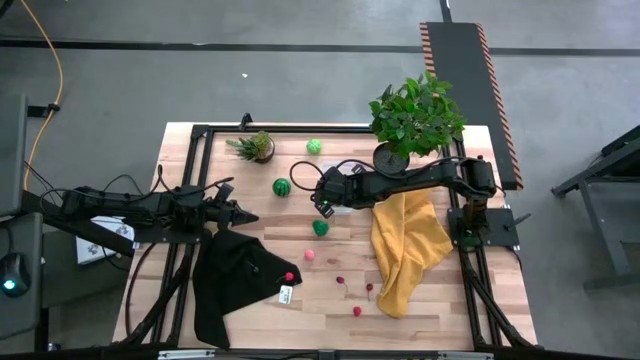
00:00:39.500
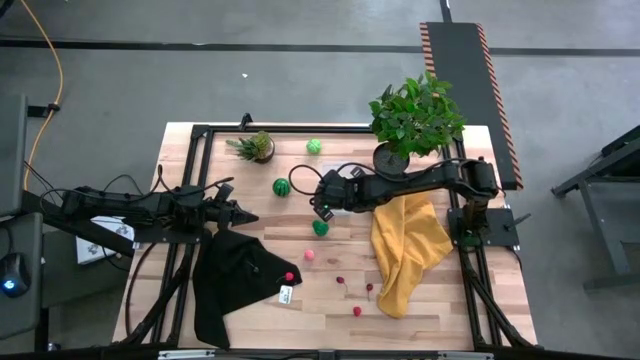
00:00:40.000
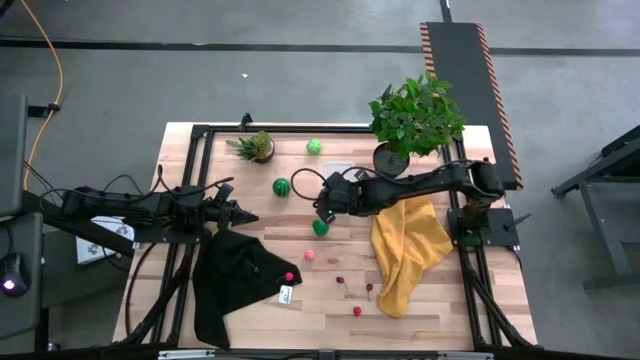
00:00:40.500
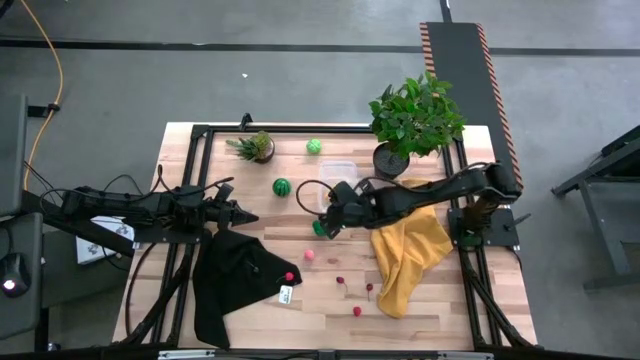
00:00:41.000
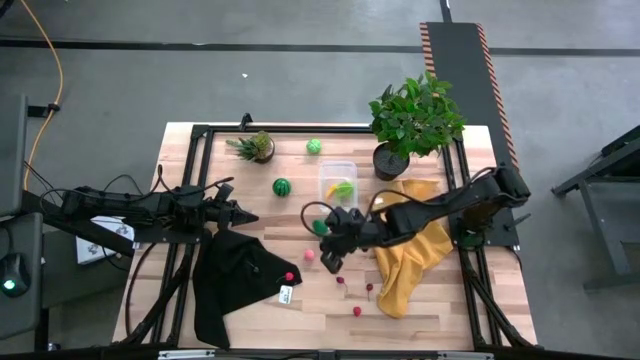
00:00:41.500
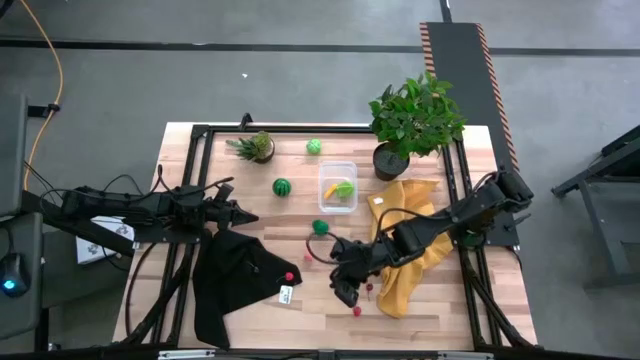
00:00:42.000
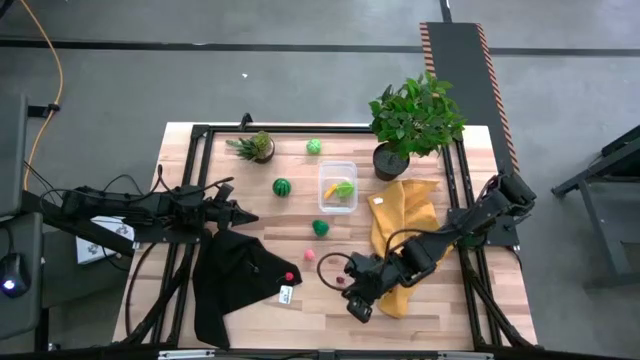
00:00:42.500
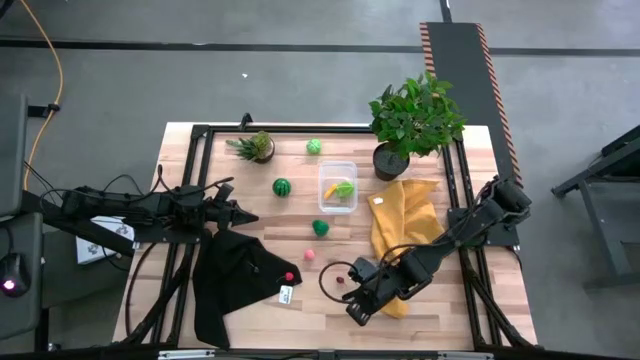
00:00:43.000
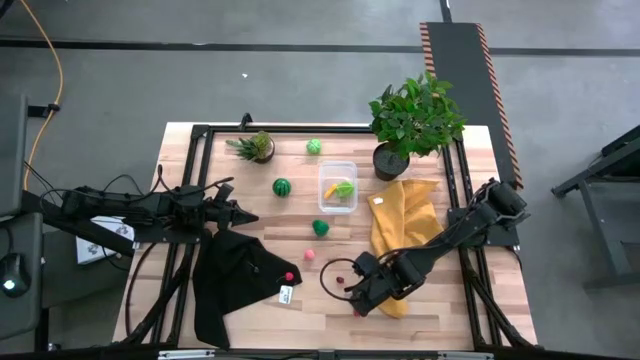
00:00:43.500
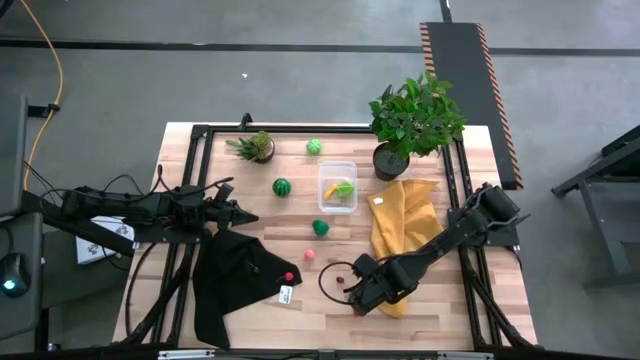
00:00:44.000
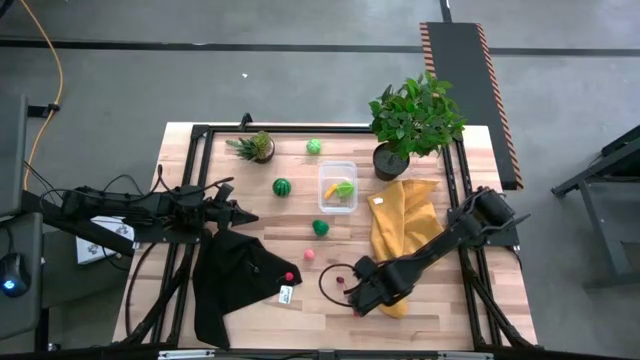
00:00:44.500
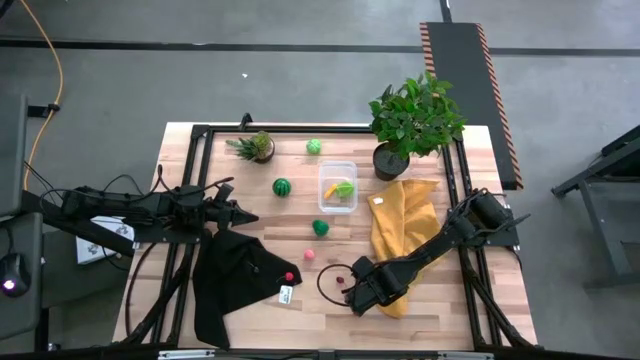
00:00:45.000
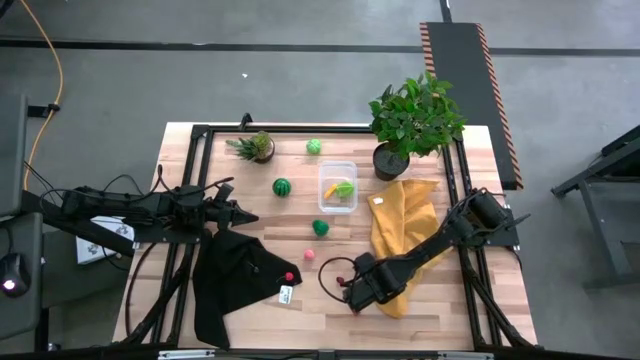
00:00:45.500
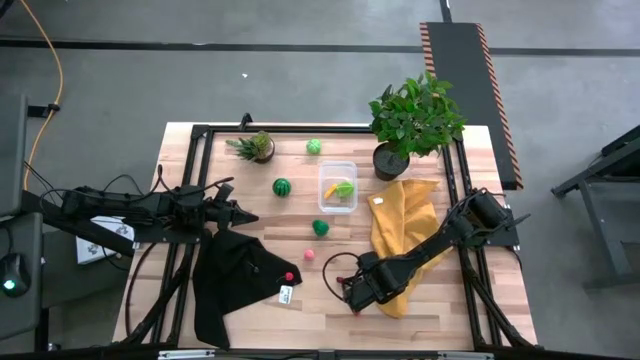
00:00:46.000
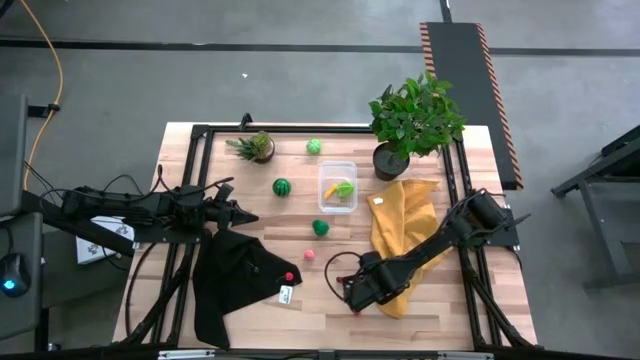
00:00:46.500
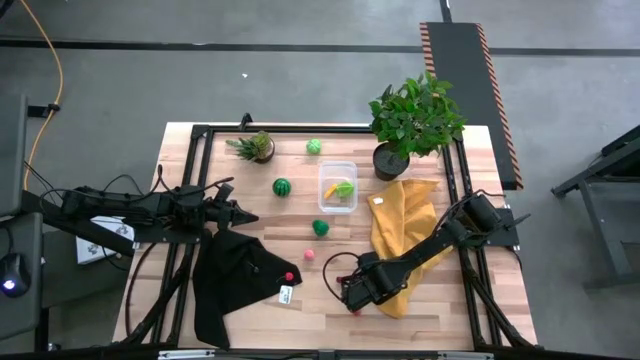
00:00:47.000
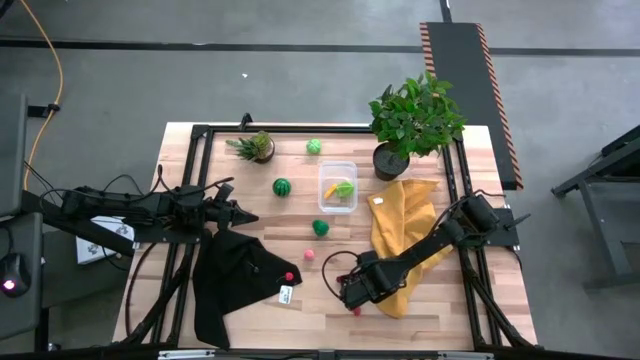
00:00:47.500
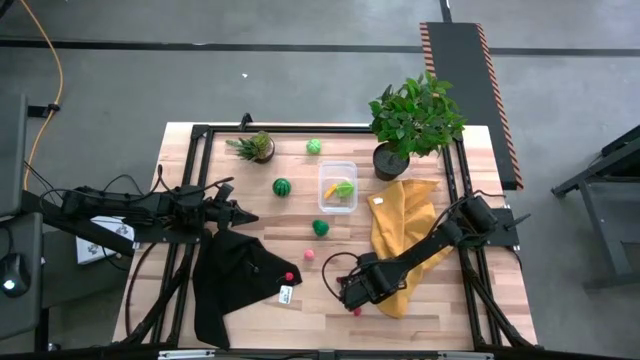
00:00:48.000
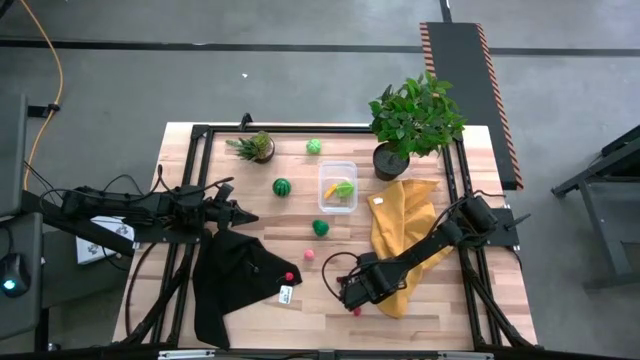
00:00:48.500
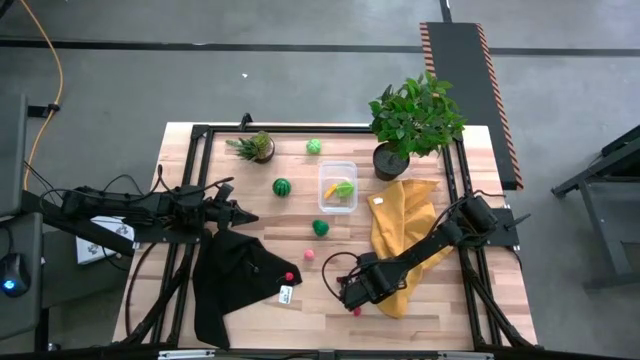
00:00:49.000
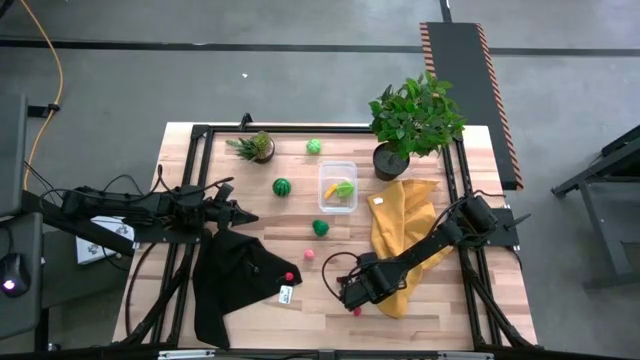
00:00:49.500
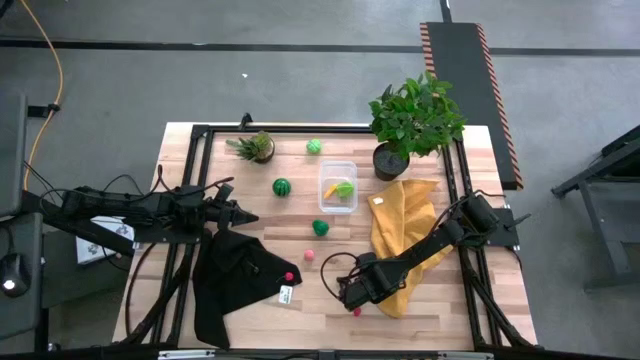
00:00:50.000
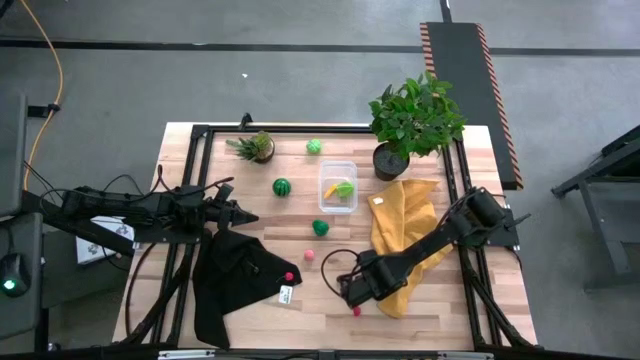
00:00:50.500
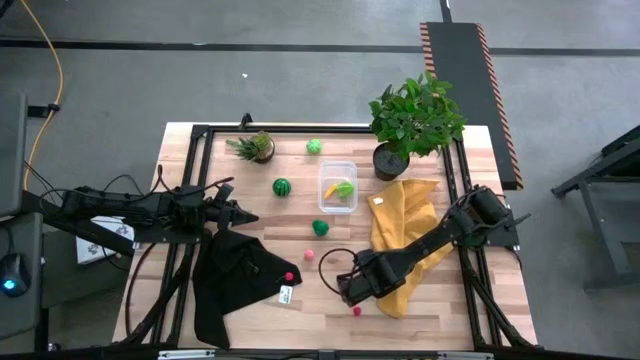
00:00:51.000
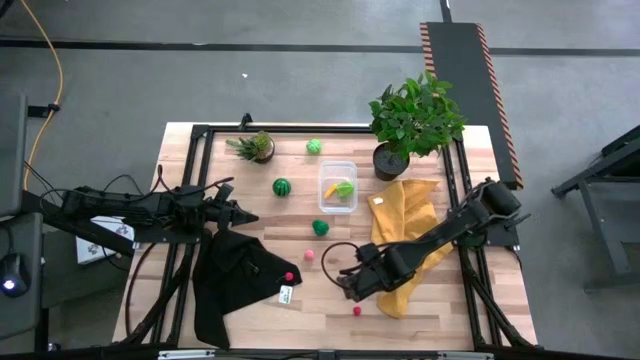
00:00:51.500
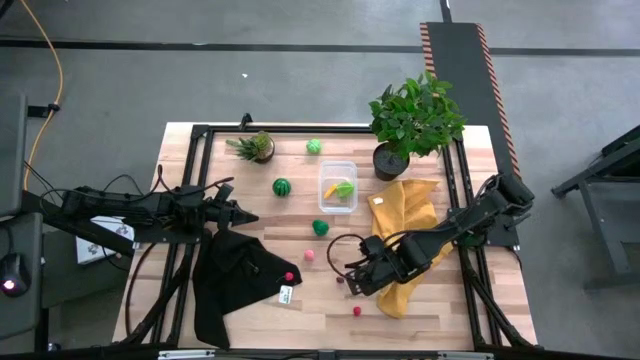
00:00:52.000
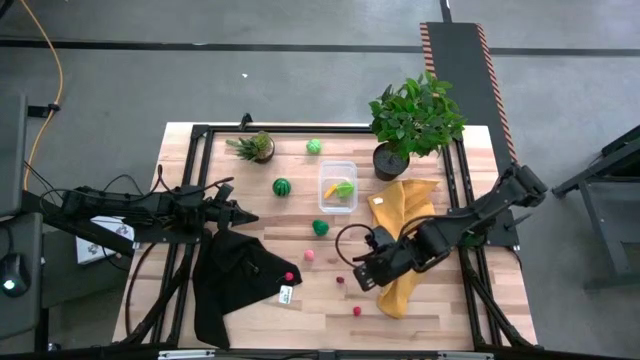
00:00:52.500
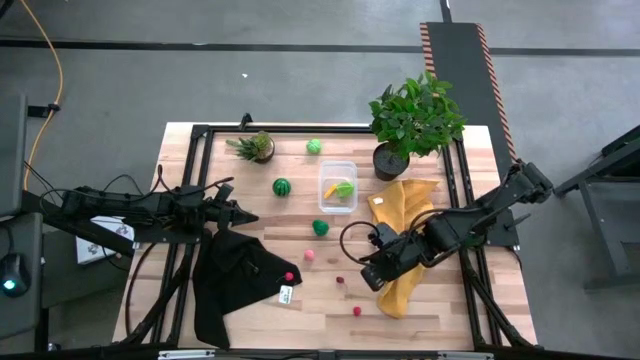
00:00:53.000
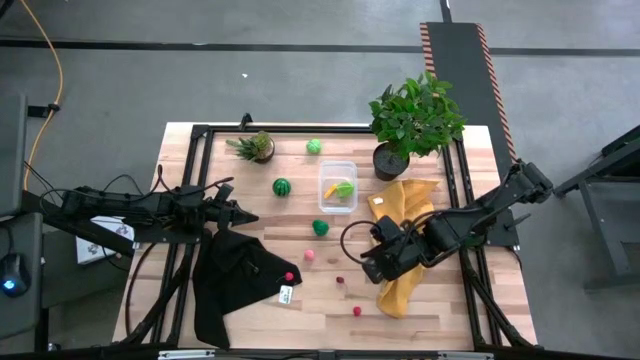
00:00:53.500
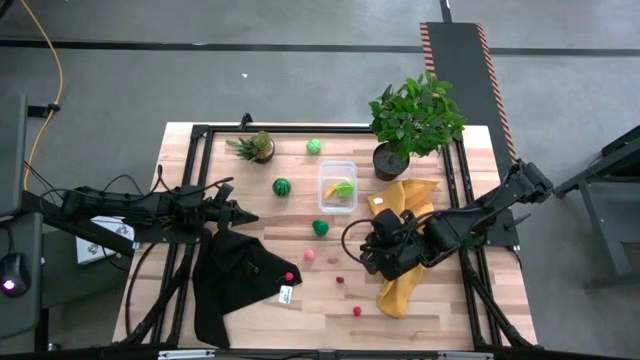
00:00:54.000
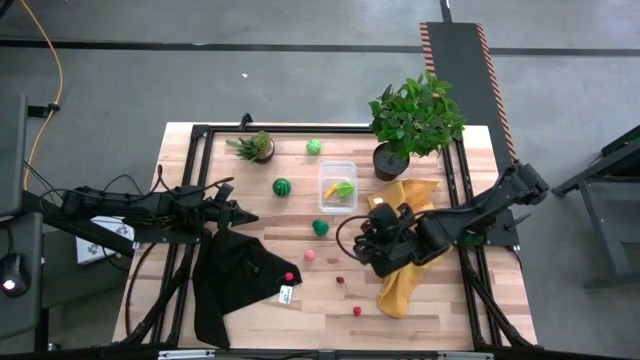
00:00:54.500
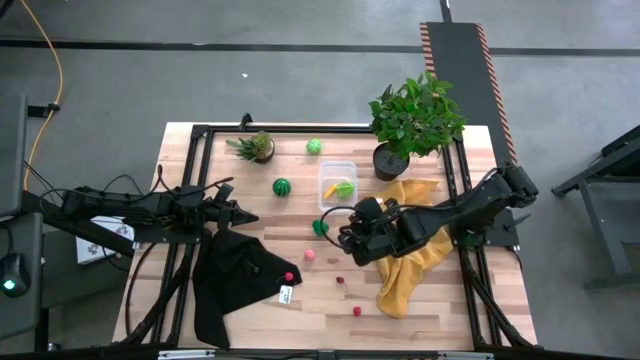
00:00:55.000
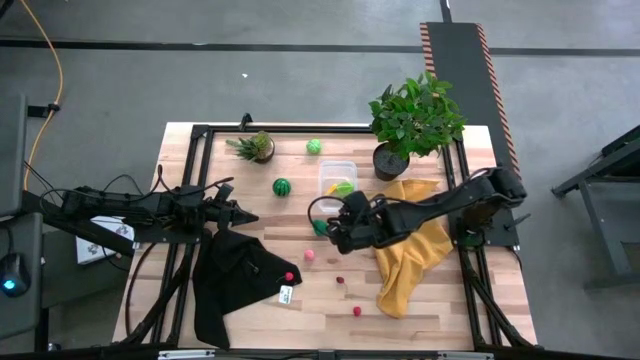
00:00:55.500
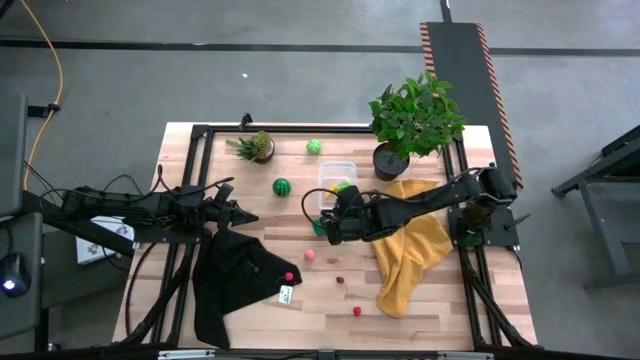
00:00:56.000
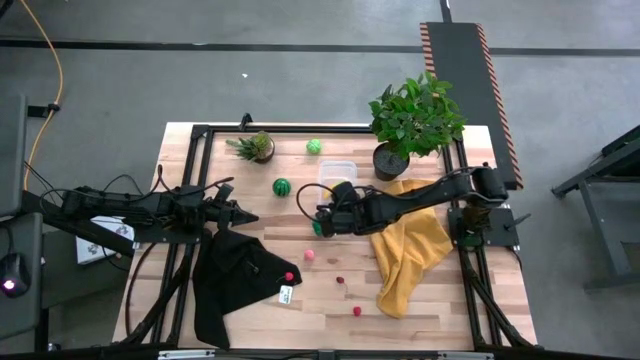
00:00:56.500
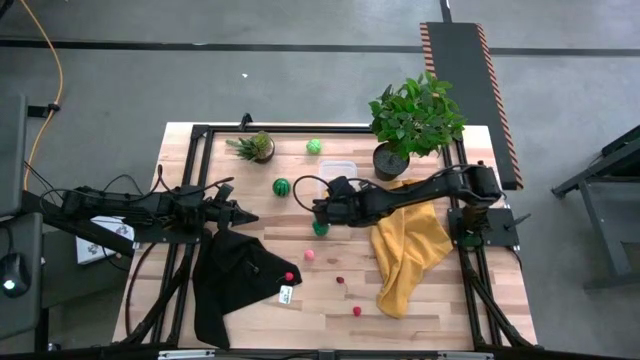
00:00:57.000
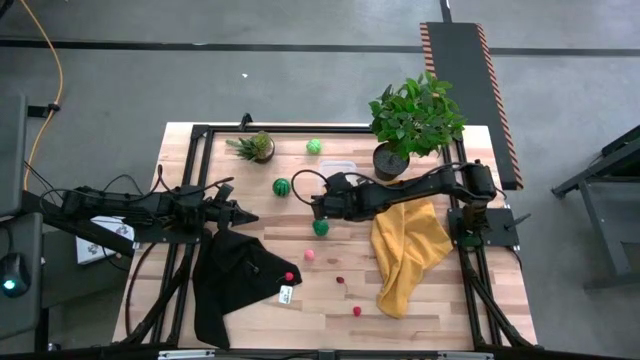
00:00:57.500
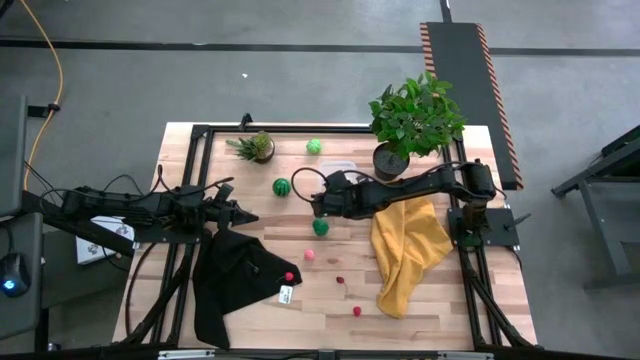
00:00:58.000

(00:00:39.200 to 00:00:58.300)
Task: Pick and placing Produce into tupperware
Put the right red cherry into the transparent bin

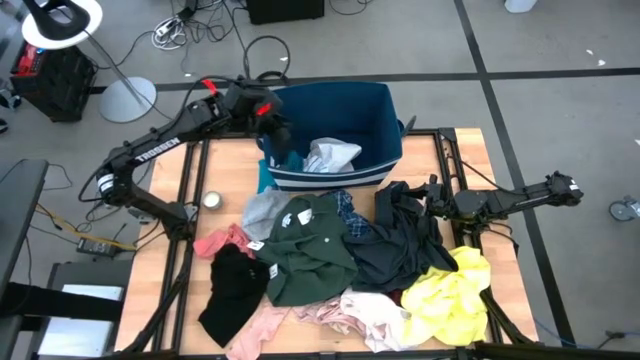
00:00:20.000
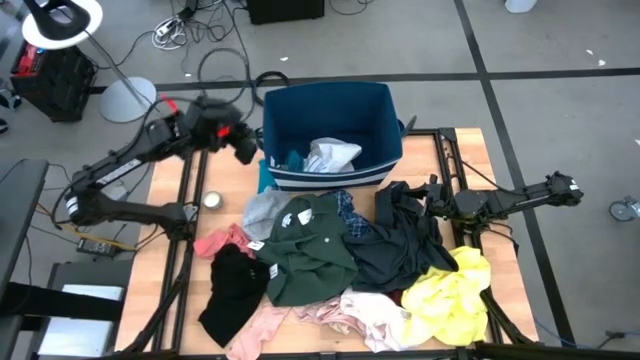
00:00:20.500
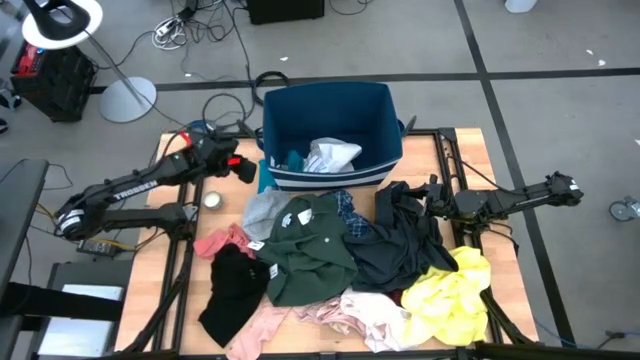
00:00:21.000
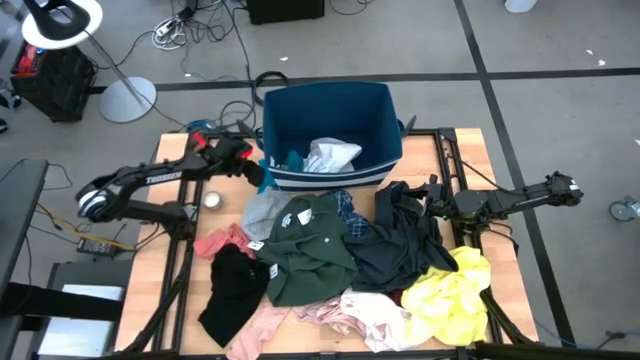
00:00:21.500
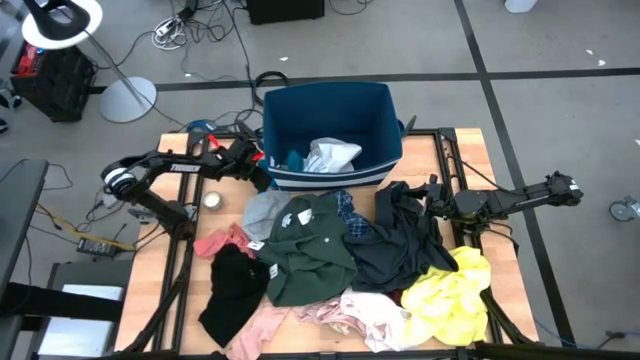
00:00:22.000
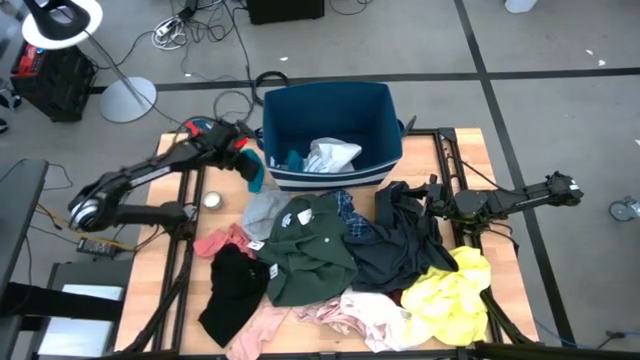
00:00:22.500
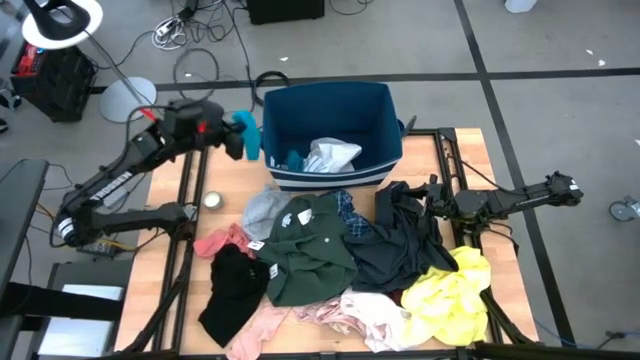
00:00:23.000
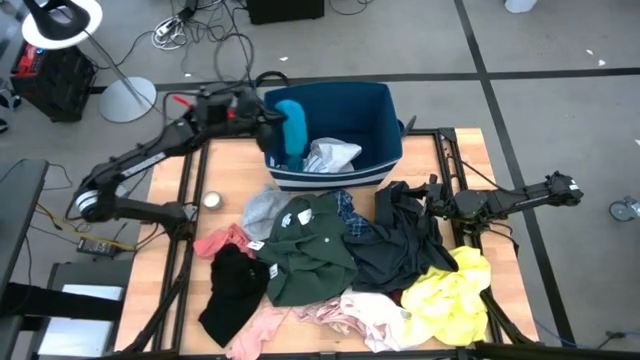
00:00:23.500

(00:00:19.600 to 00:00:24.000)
Task: Sort clothes
Put the blue sock into the blue laundry bin
